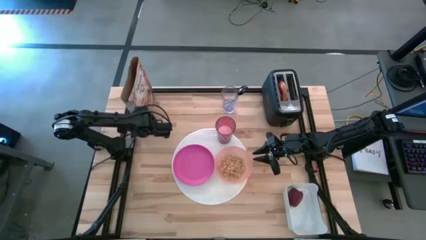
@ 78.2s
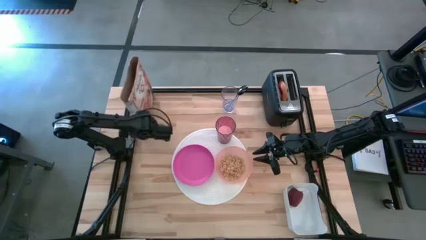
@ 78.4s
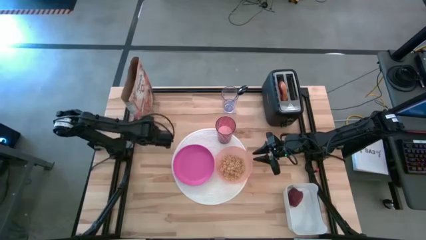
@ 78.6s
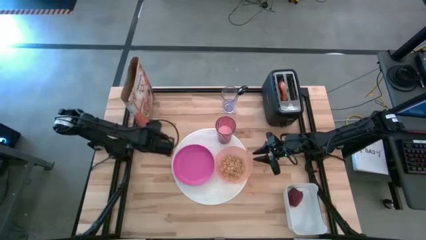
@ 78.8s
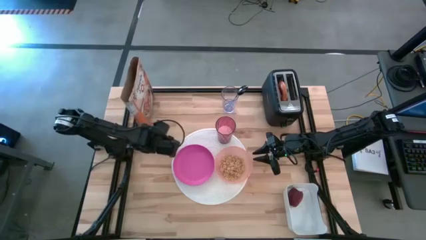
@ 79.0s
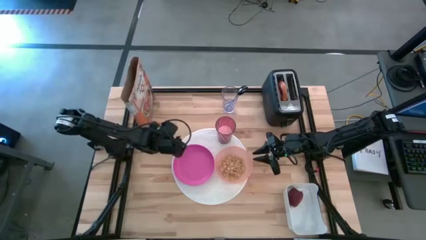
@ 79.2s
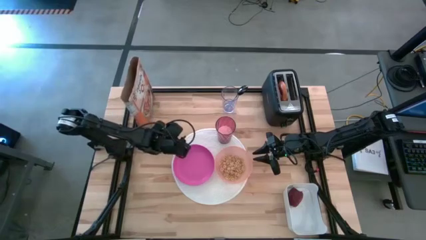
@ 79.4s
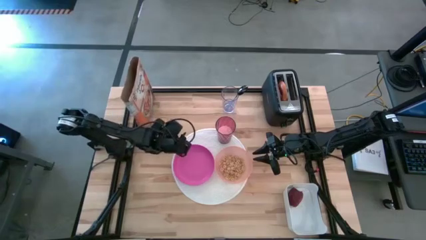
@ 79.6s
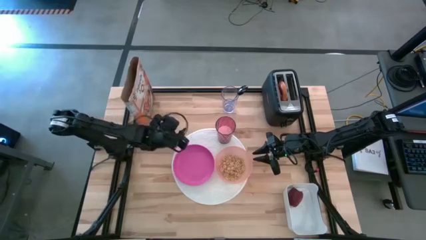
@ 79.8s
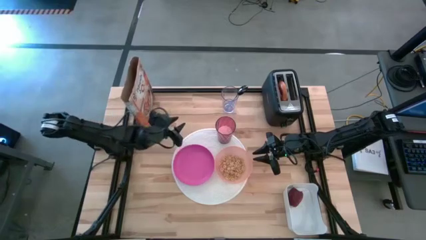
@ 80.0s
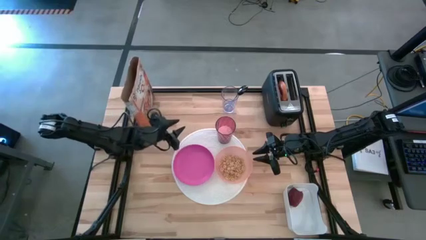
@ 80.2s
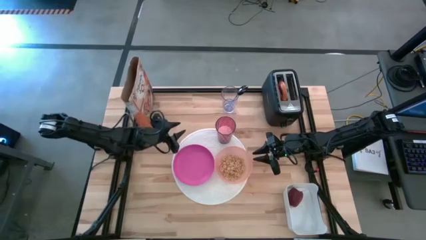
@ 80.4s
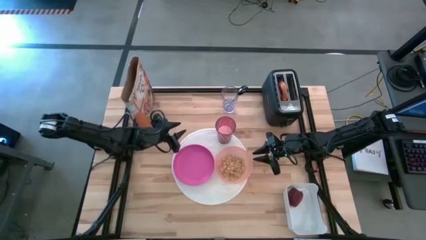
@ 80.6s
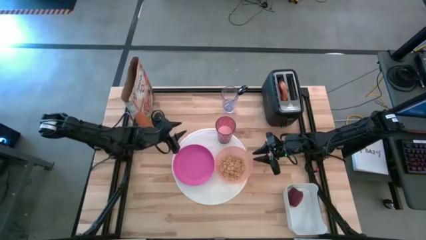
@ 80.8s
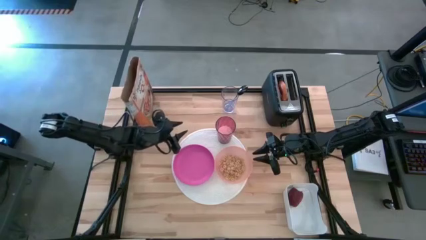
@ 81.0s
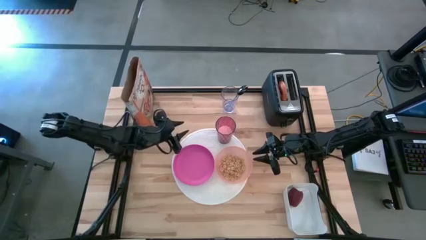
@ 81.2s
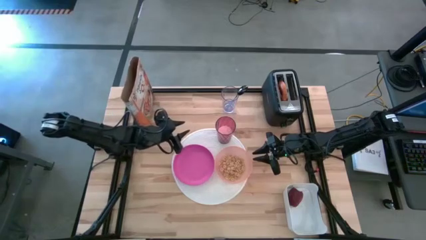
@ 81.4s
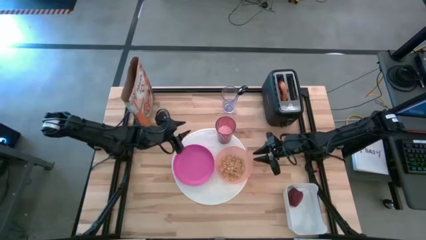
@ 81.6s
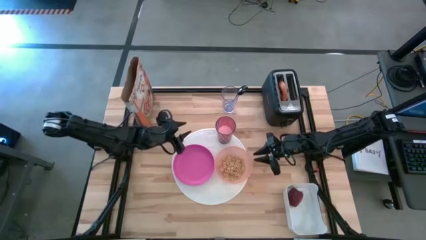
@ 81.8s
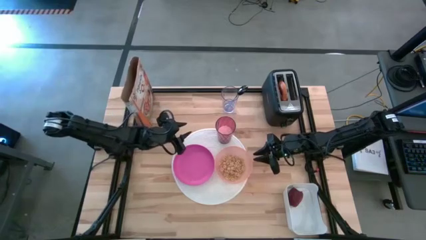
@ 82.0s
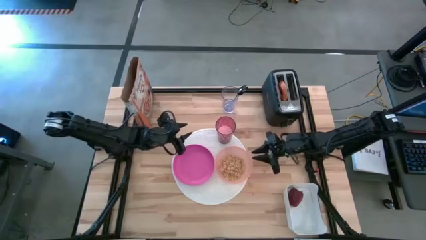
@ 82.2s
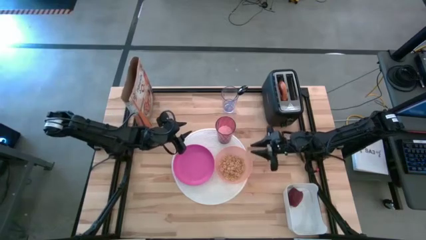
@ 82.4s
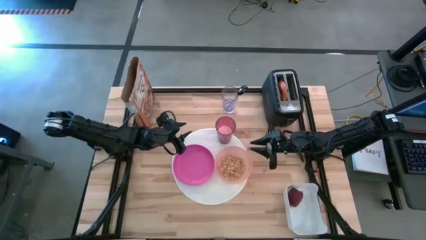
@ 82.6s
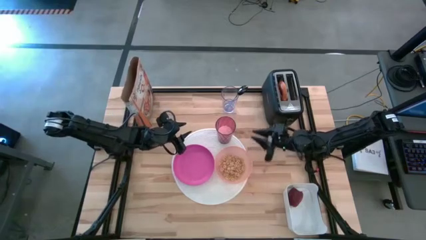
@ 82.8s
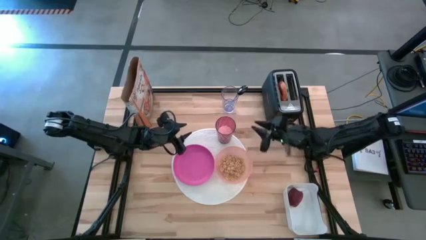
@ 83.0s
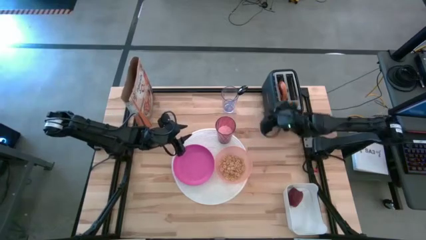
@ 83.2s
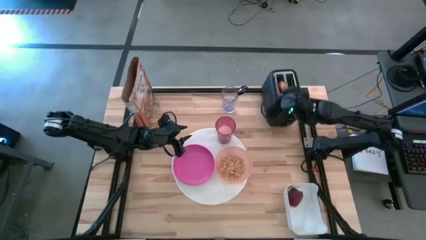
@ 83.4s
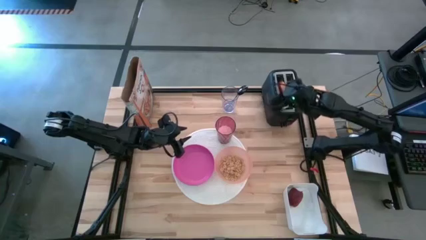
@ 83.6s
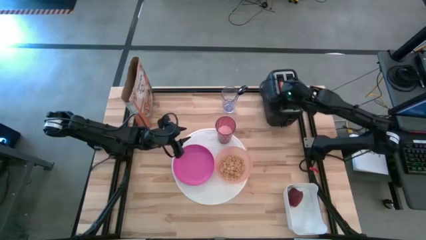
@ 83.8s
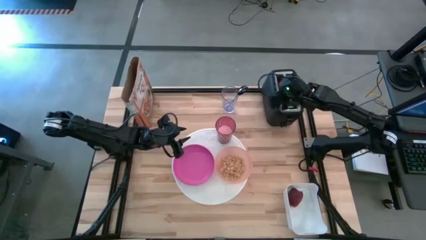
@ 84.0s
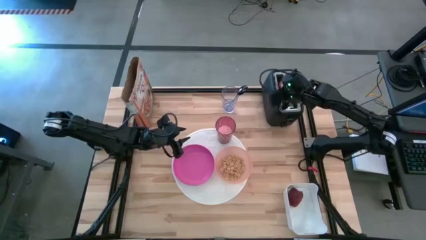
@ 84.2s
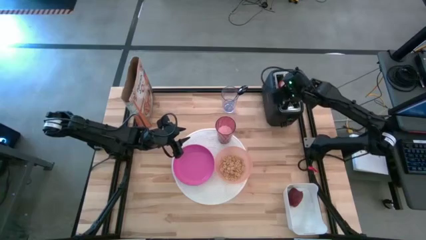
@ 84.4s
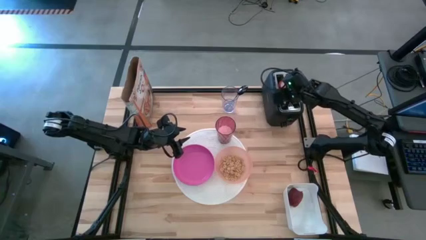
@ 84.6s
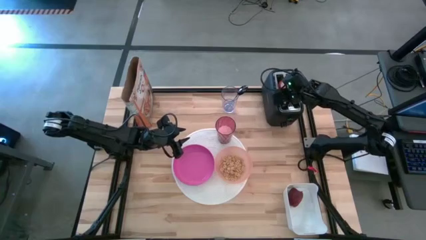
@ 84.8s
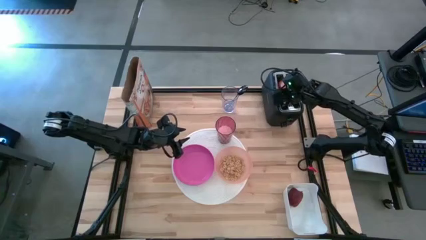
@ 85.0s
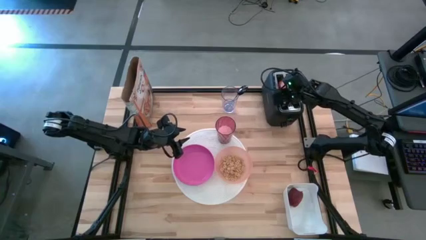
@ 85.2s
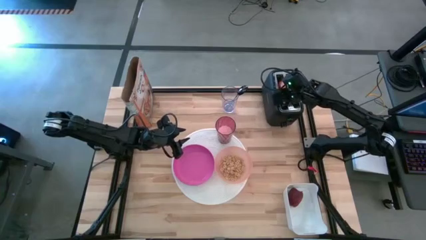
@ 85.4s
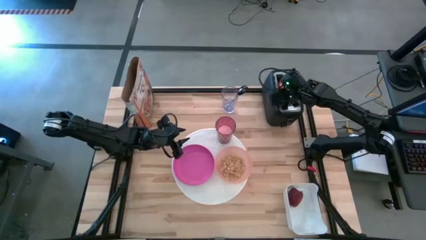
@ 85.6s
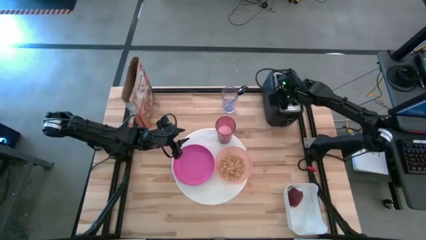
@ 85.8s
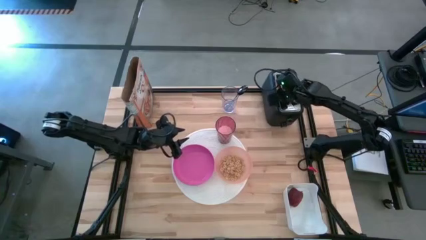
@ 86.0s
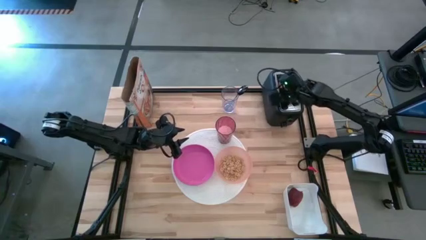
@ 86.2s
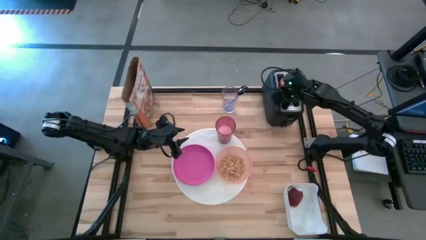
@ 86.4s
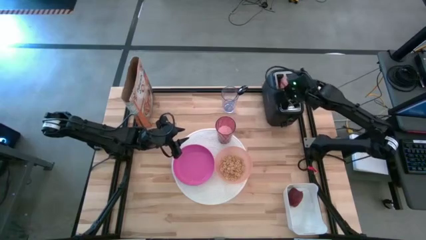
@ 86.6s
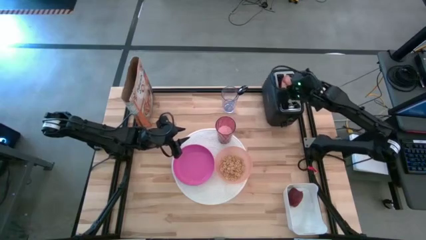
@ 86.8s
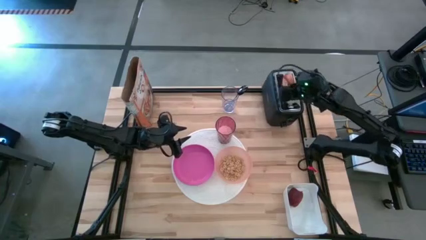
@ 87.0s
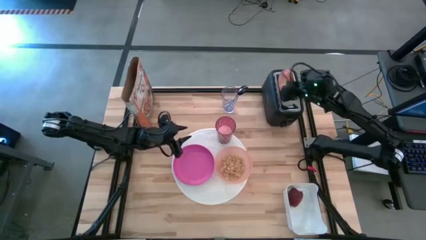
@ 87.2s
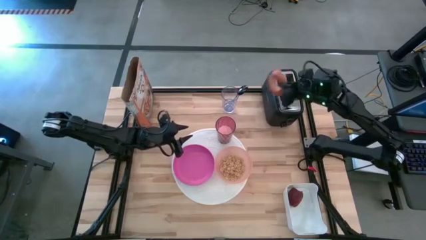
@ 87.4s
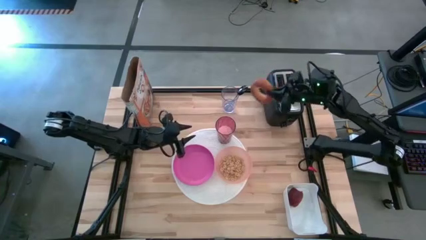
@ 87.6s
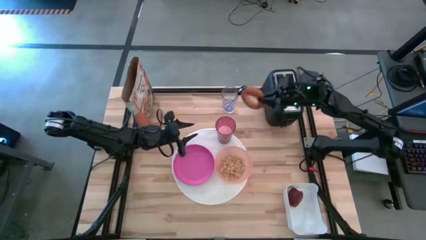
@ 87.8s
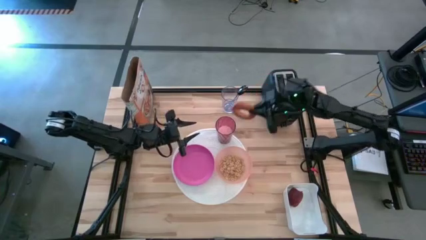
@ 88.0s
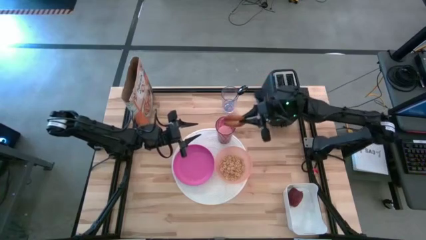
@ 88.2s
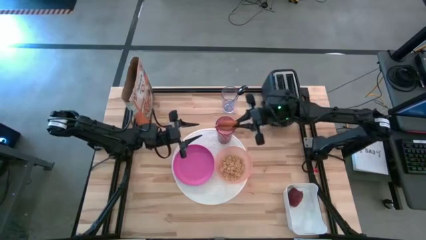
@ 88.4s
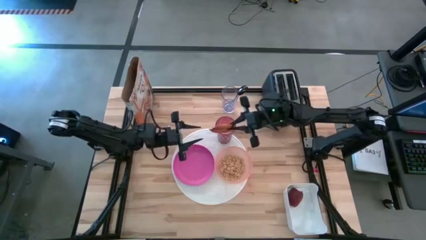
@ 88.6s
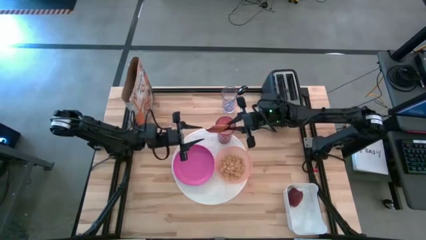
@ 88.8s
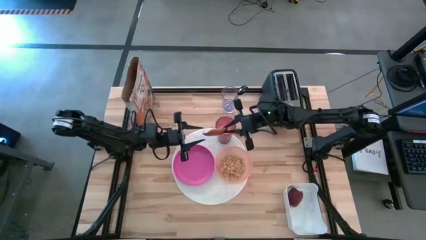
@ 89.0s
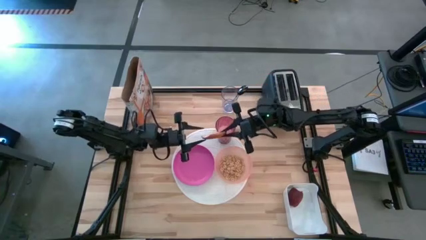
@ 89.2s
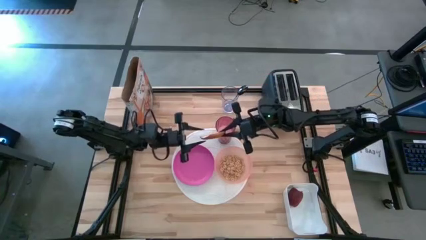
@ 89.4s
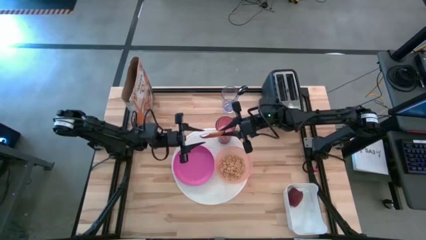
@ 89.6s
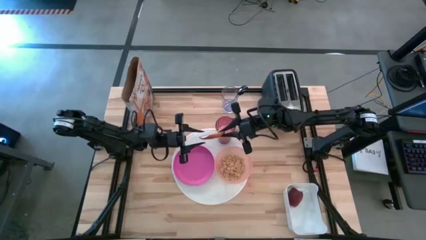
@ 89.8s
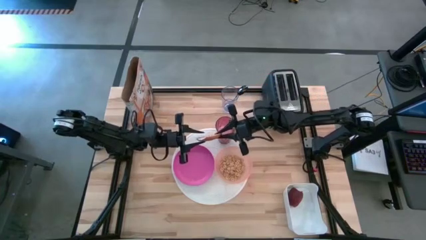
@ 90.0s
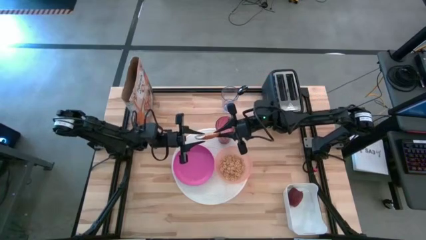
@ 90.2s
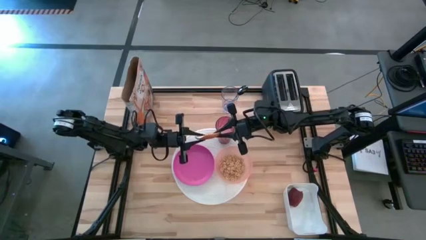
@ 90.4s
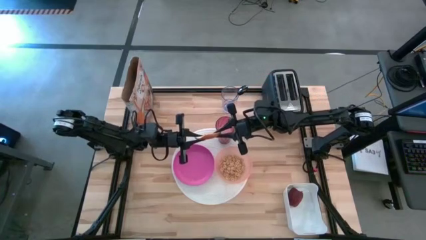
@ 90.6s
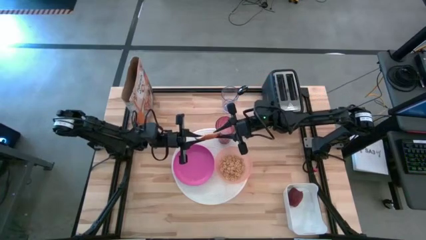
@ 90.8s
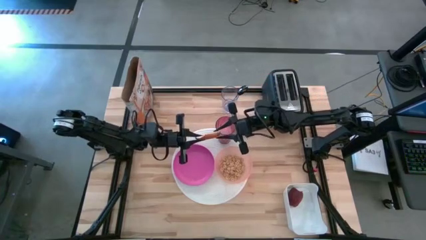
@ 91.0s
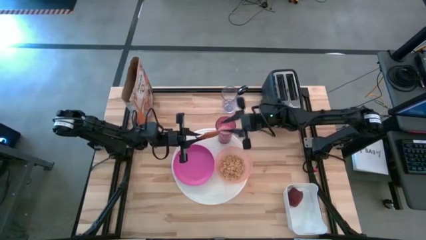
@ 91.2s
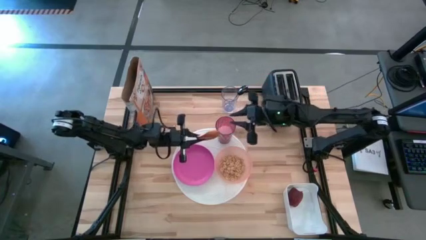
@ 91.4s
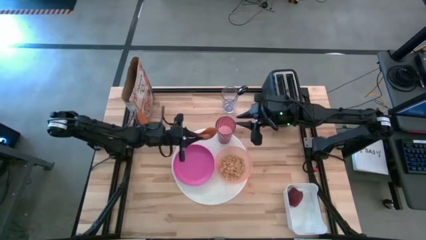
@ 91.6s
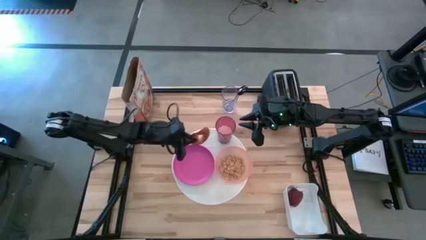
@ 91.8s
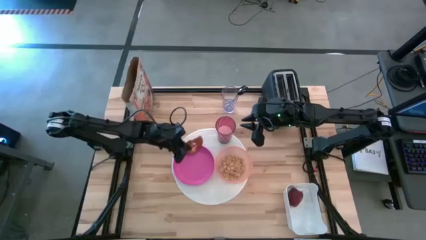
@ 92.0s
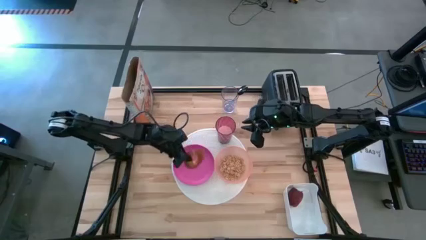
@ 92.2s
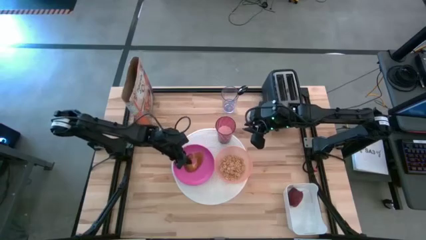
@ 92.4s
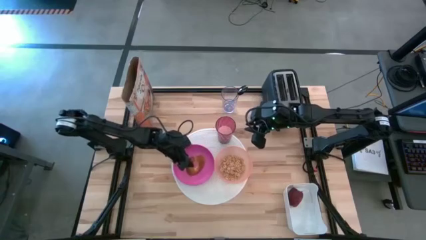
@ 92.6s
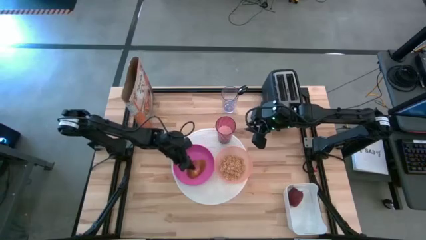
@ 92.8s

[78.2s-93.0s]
Task: Arrange a breakfast setting
Put the bagel from the black toaster on the pink plate on the white mat

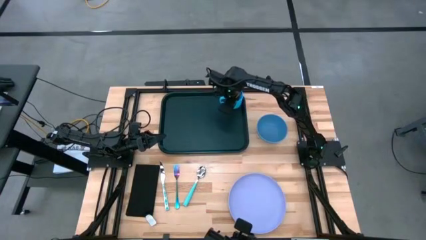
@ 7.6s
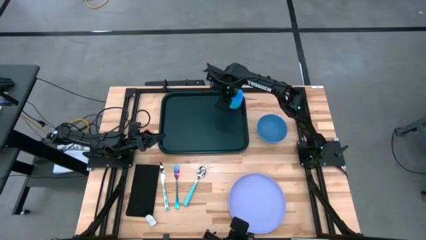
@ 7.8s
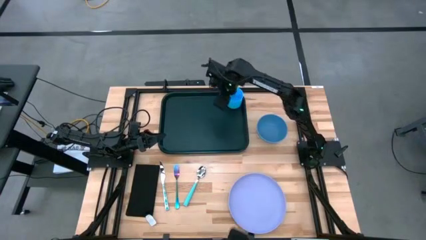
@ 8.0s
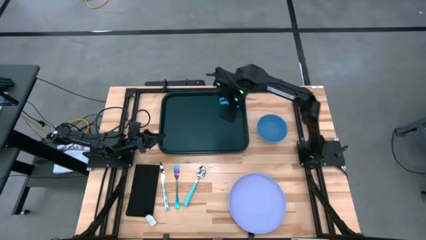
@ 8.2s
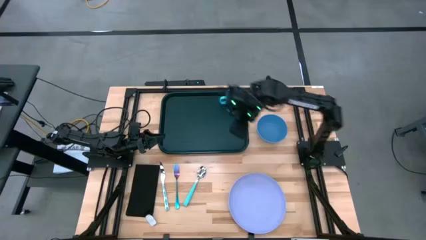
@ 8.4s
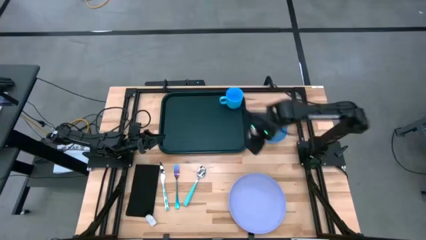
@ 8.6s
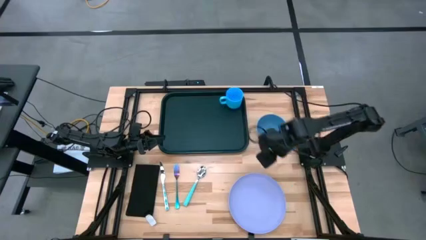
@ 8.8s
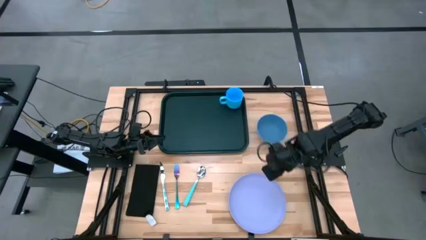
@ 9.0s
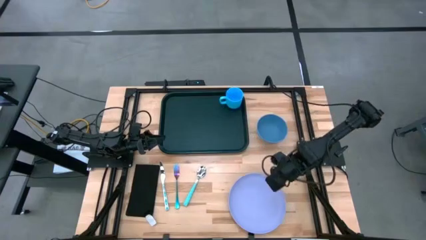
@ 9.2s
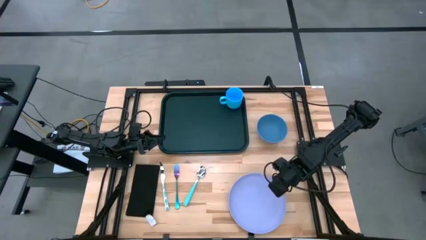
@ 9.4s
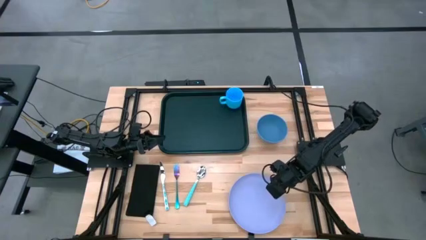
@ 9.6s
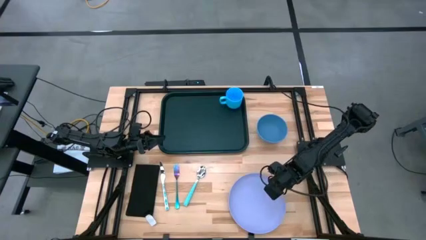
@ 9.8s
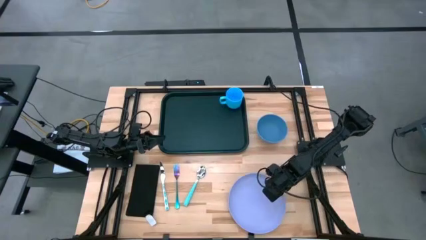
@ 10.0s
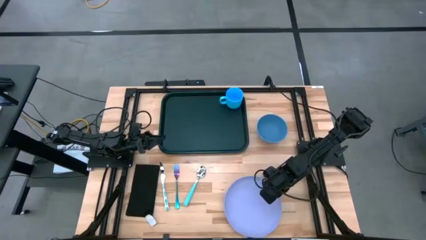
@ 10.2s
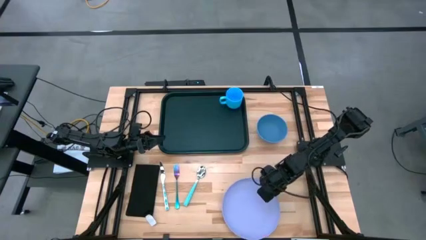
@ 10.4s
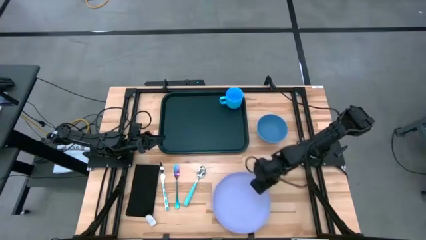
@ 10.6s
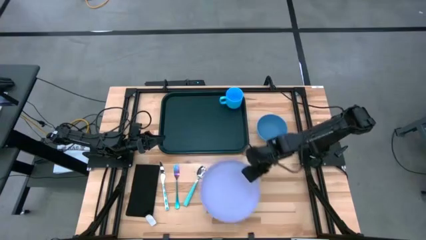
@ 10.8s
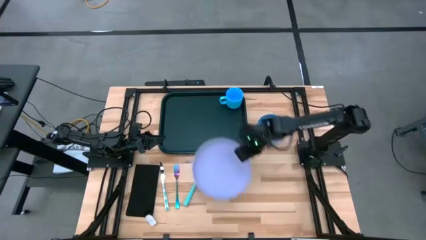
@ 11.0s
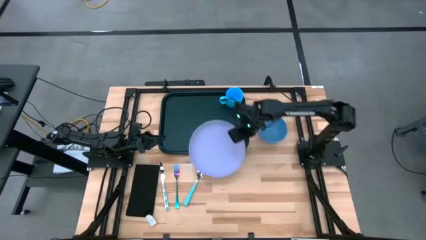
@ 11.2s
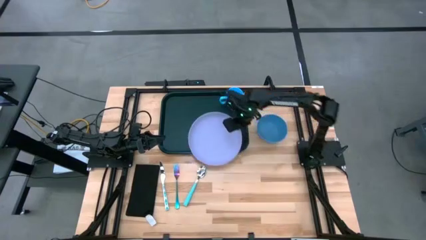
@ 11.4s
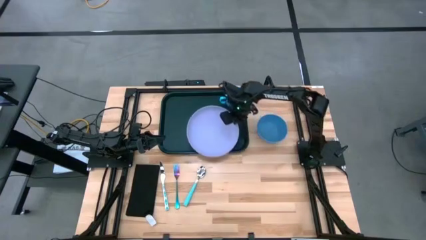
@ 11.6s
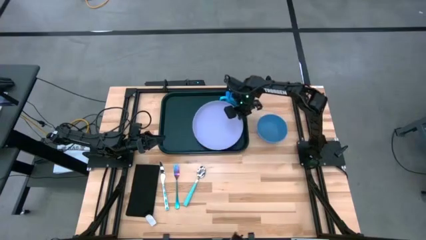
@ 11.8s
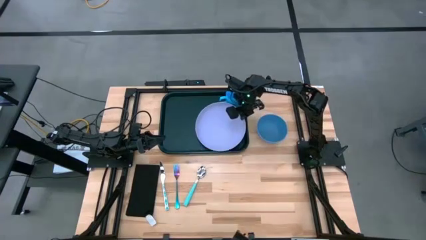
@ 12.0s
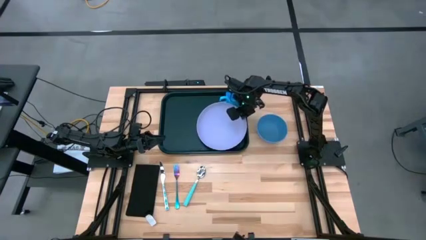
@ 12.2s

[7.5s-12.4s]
Task: Set up tray
Put the purple plate on the black tray below the blue mug
